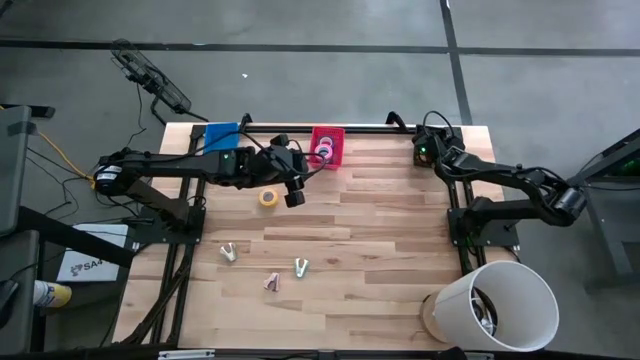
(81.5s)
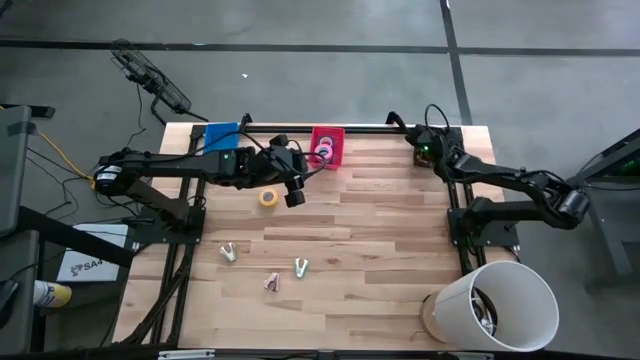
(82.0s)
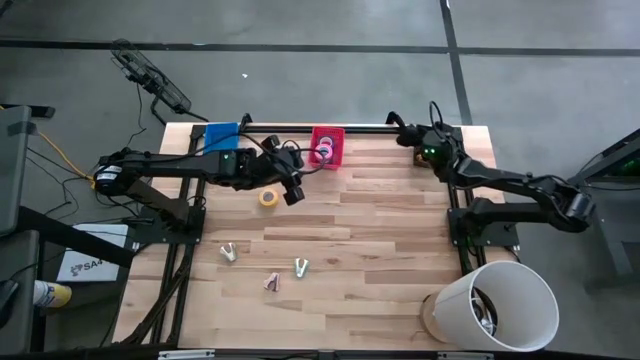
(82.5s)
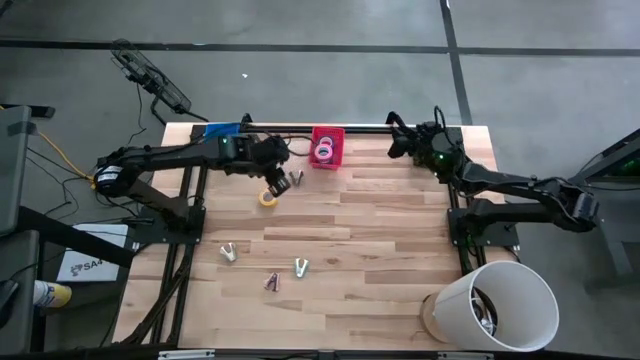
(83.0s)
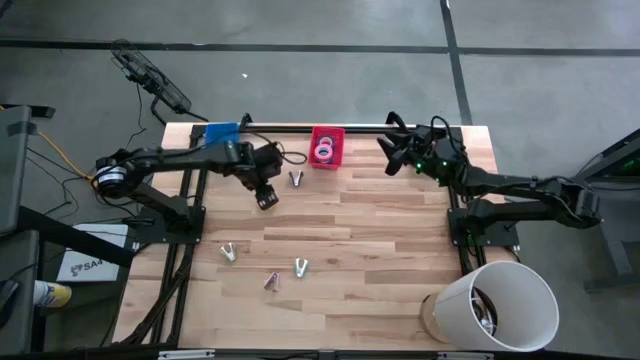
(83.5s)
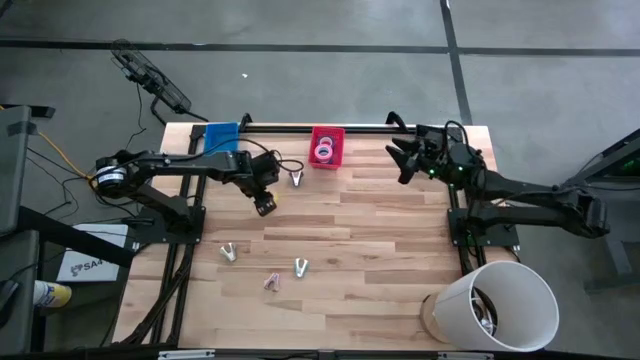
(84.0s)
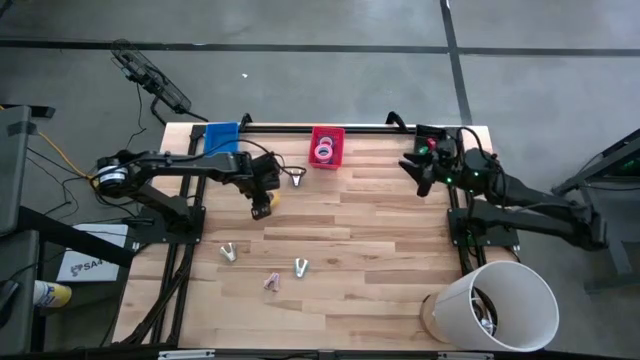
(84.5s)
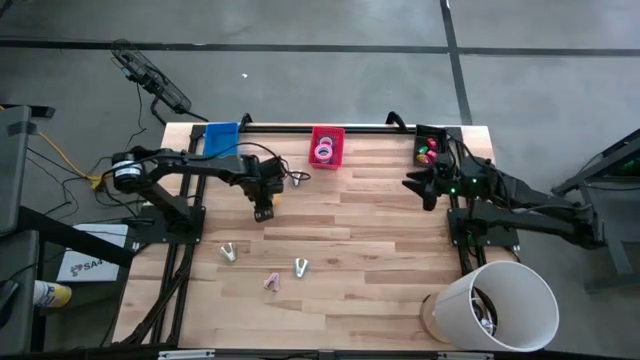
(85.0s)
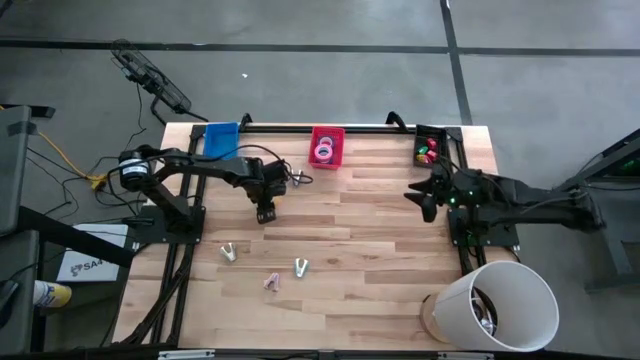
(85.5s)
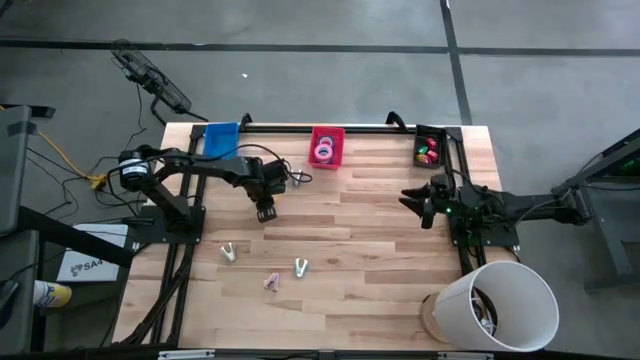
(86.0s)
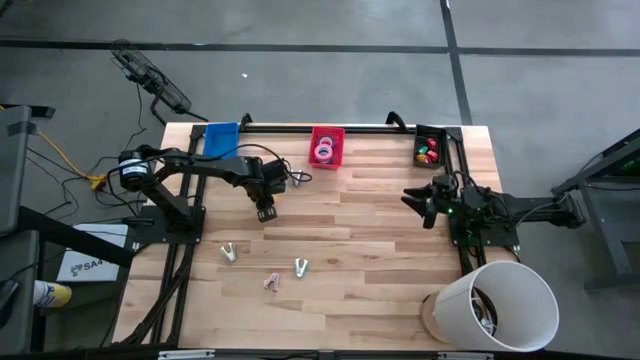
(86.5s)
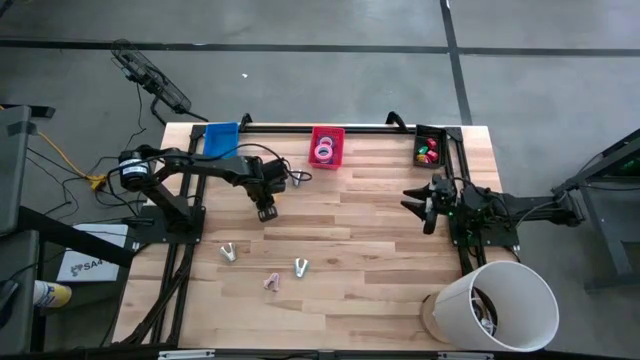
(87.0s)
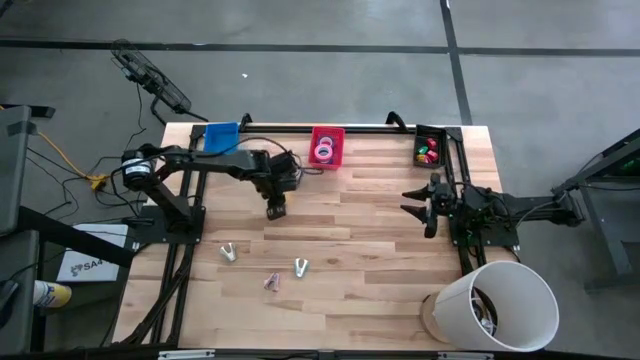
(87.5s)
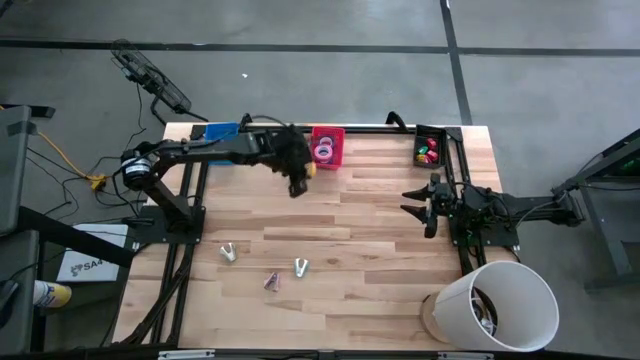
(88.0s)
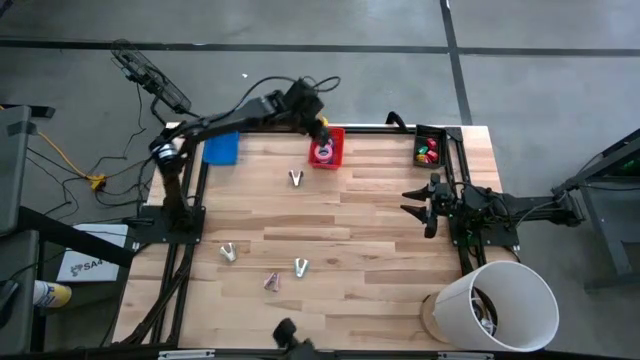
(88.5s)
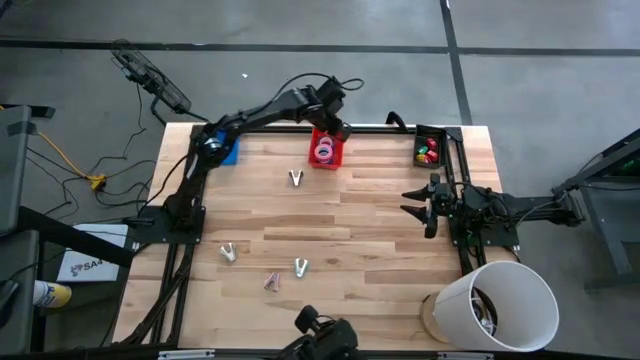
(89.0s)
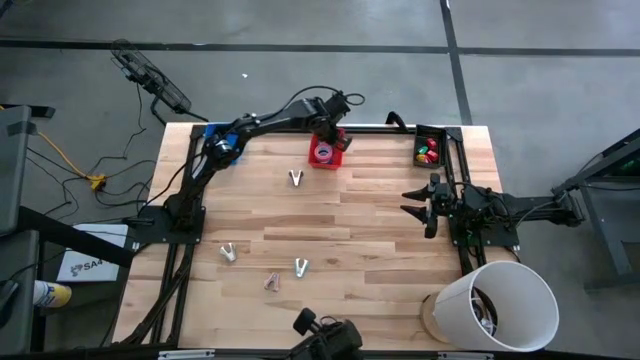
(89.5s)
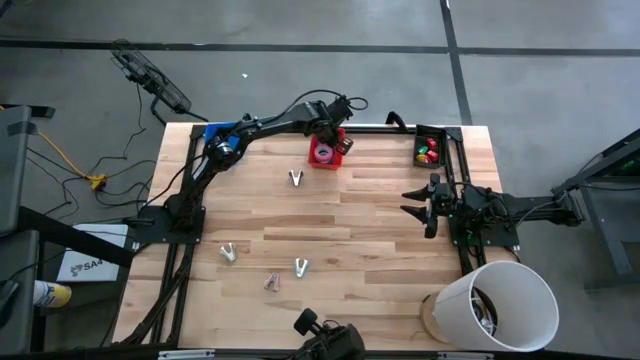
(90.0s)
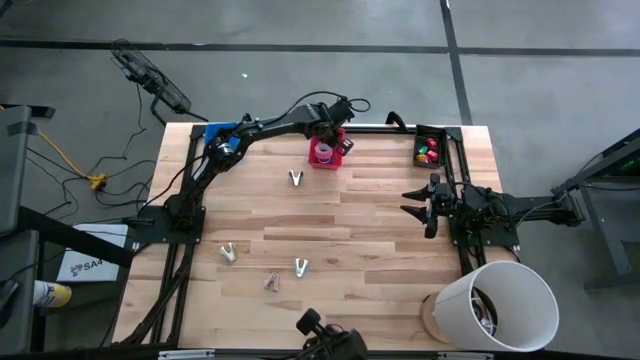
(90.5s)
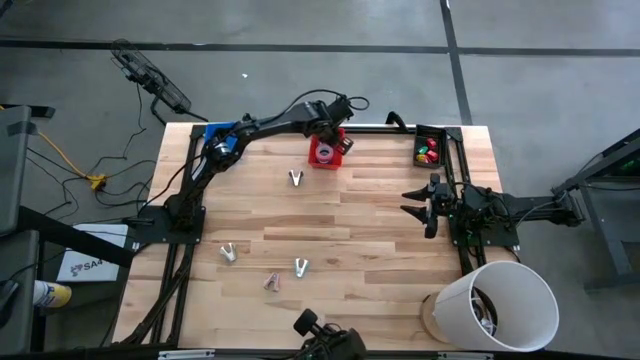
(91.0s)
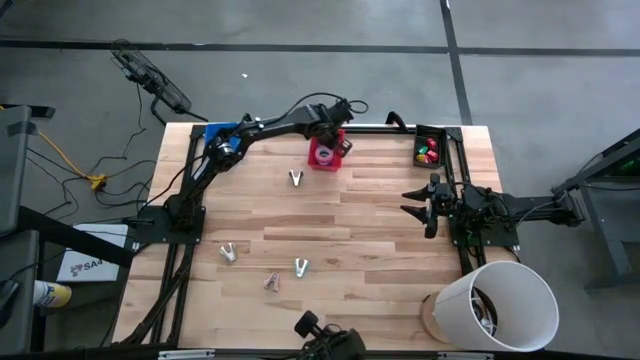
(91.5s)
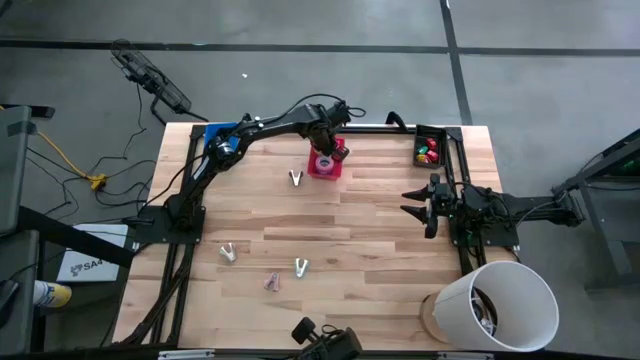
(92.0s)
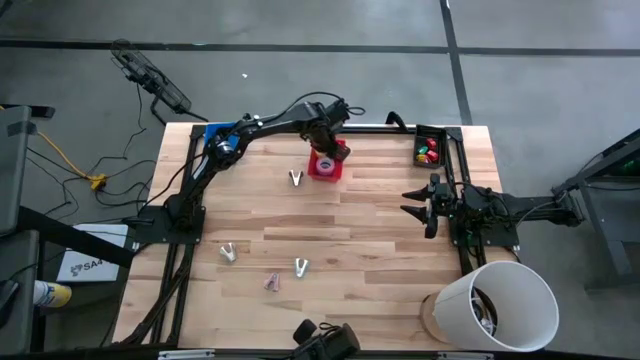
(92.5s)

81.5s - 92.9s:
Task: Pick and place Stapler, Stapler remover, tape
Put the yellow tape into the red bin

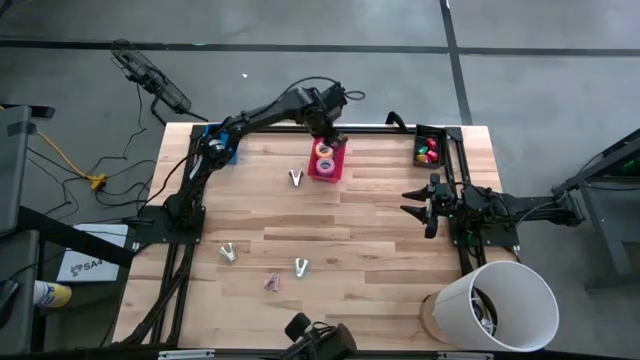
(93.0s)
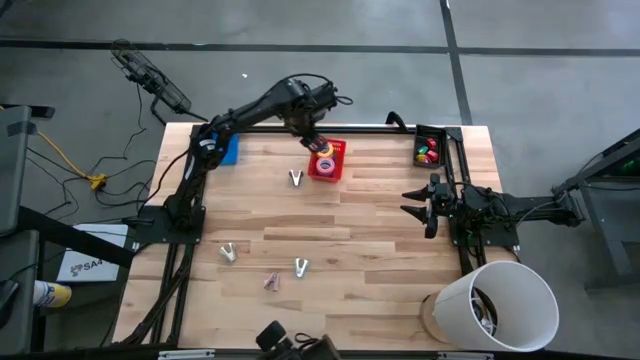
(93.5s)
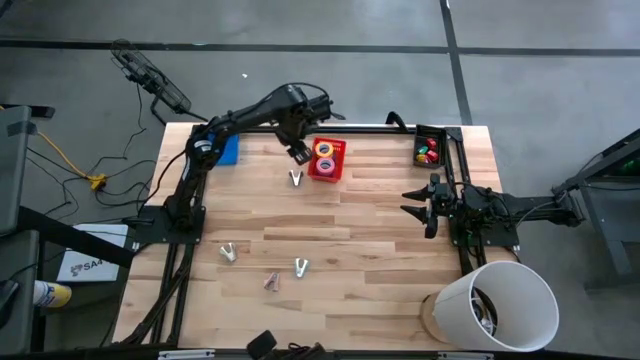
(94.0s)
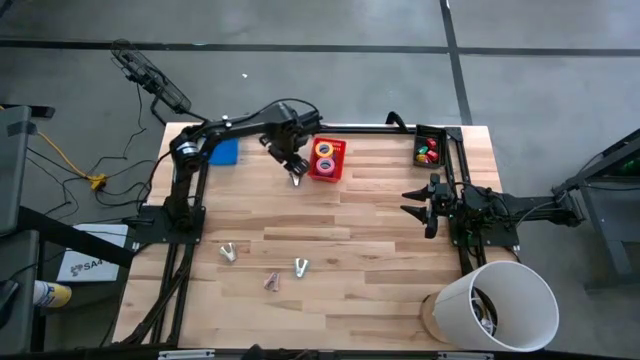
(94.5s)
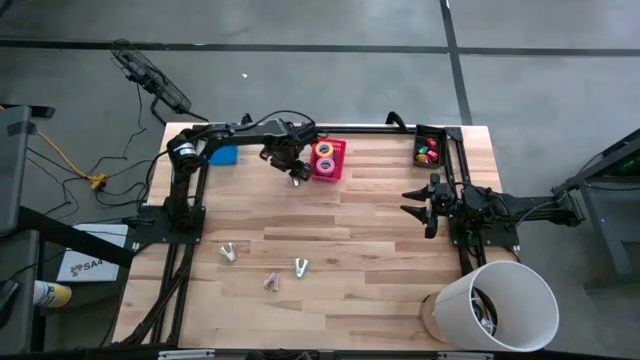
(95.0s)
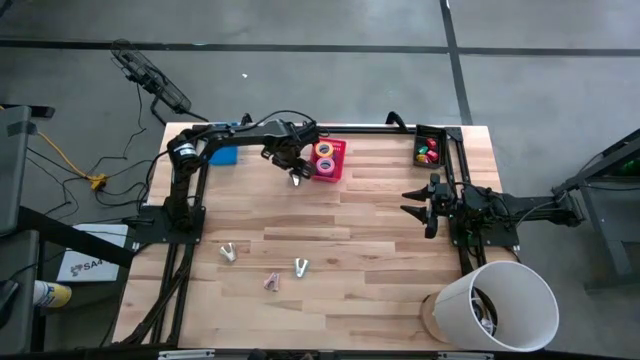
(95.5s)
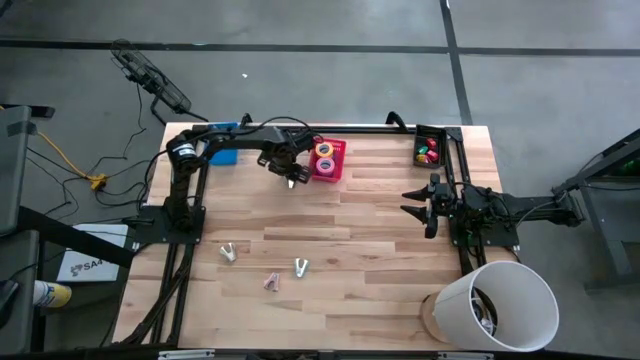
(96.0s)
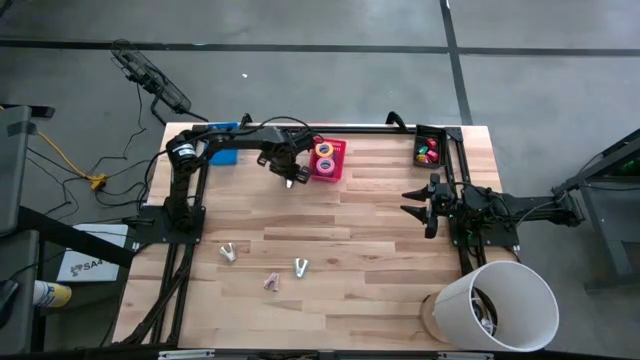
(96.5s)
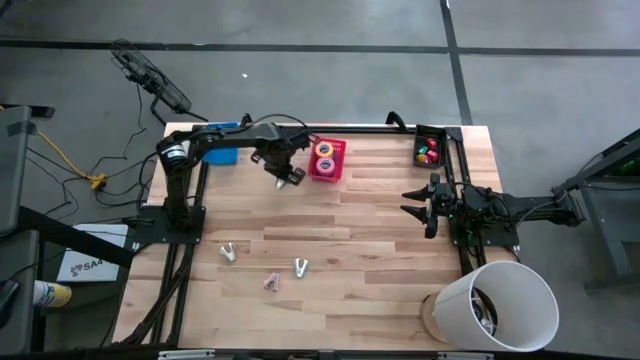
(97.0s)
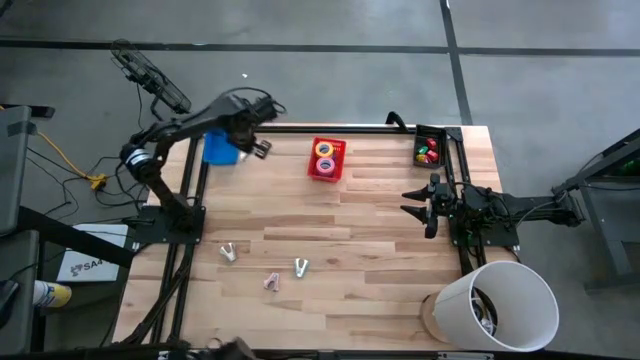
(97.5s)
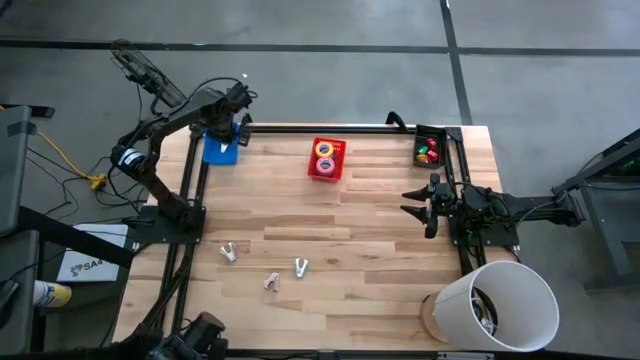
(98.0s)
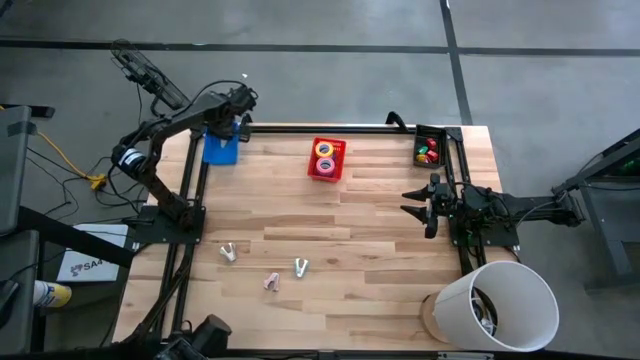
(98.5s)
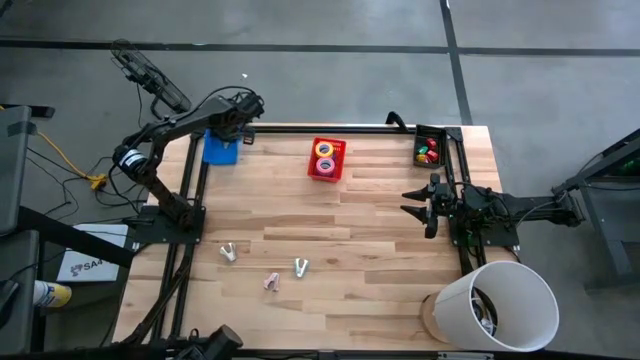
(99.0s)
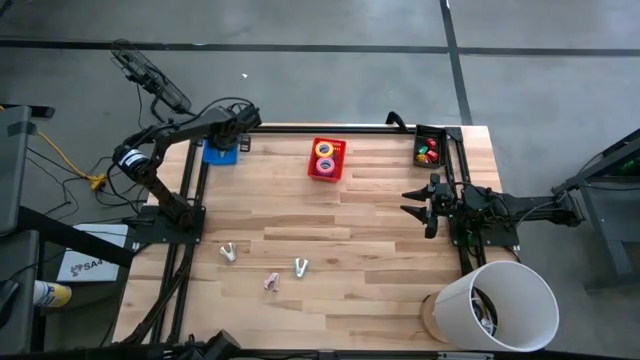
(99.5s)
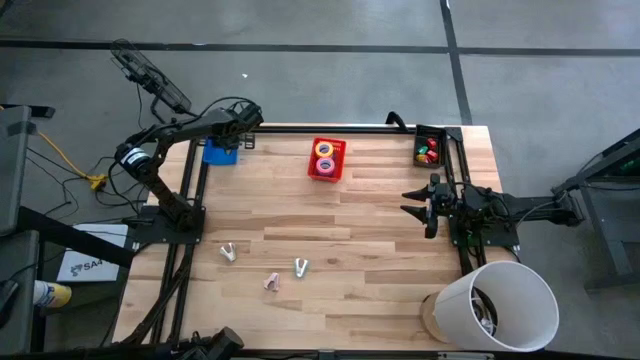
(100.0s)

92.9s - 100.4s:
Put the black staple remover into the blue bin

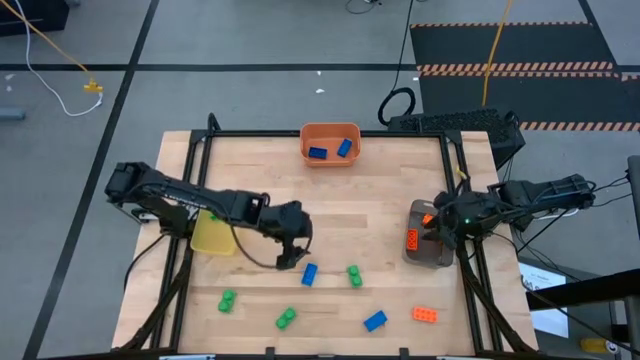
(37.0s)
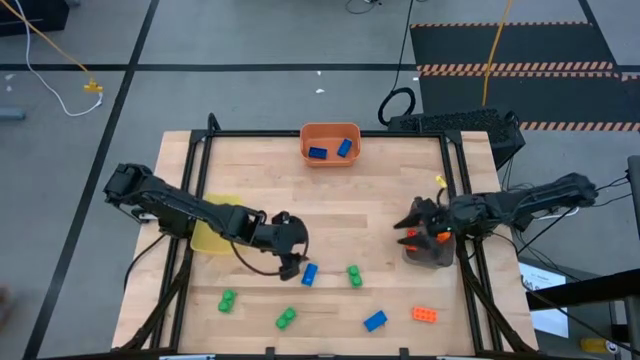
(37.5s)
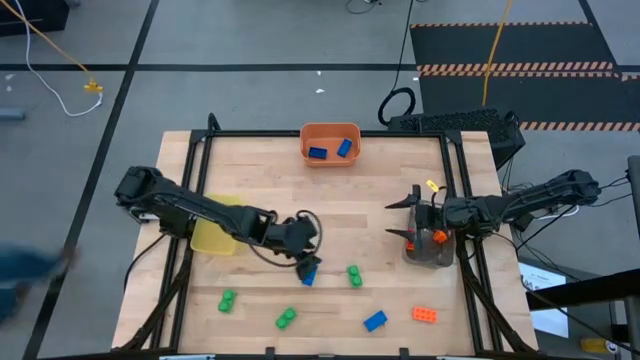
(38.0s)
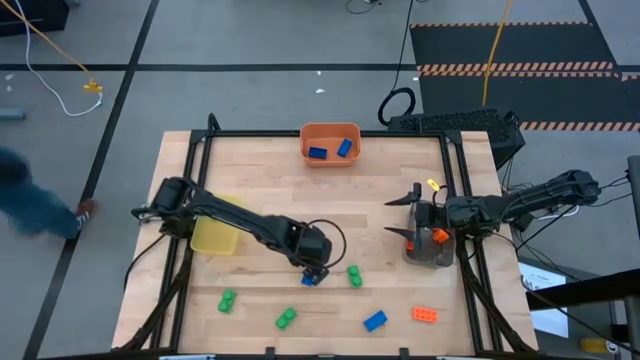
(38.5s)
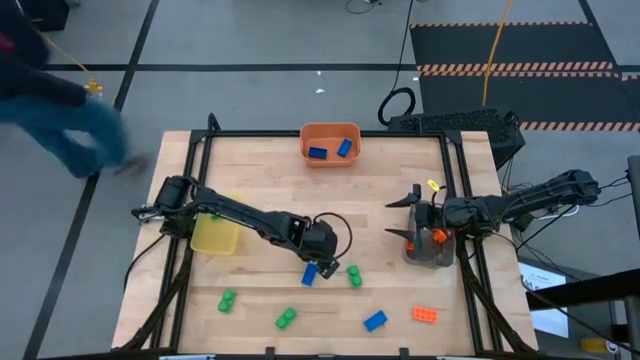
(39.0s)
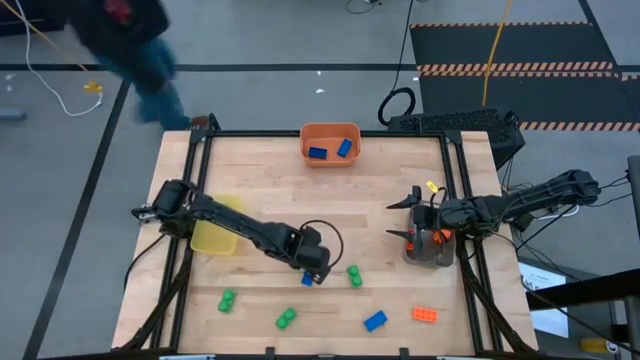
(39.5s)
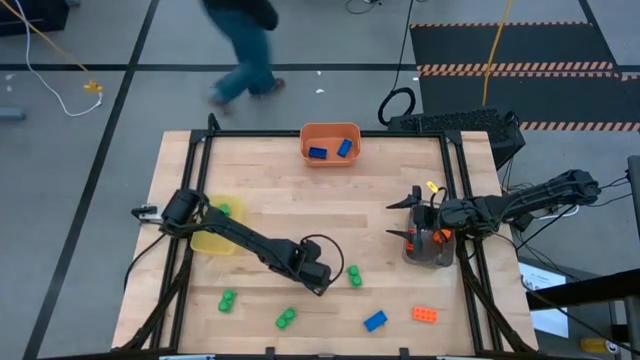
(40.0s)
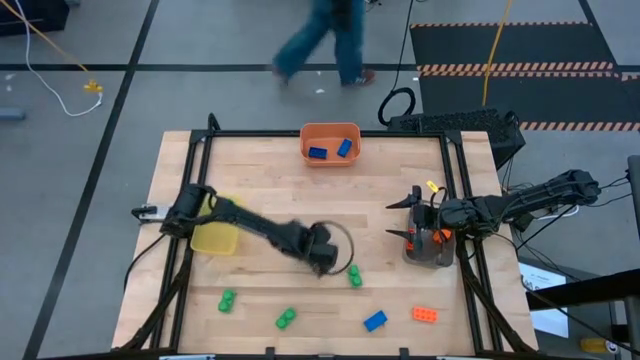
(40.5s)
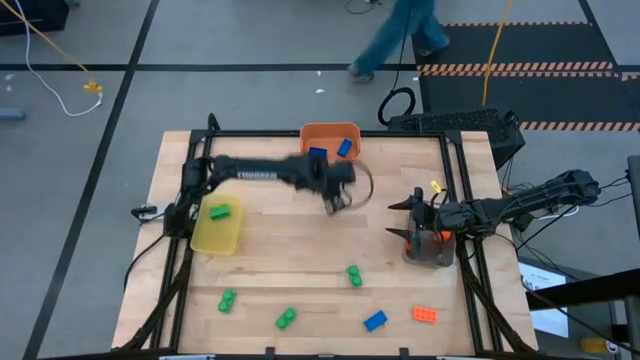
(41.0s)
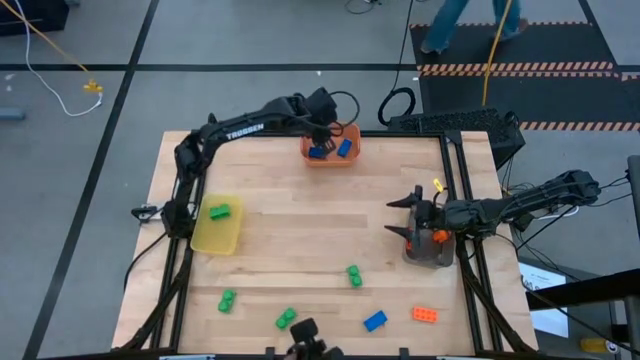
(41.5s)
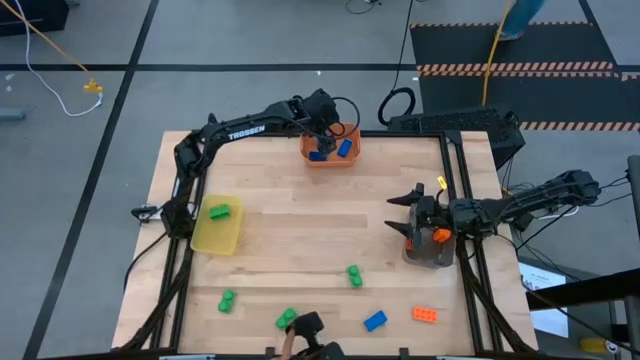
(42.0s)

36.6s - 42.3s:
Task: Sort & place blocks by color
Put the blue game piece into the orange bin
